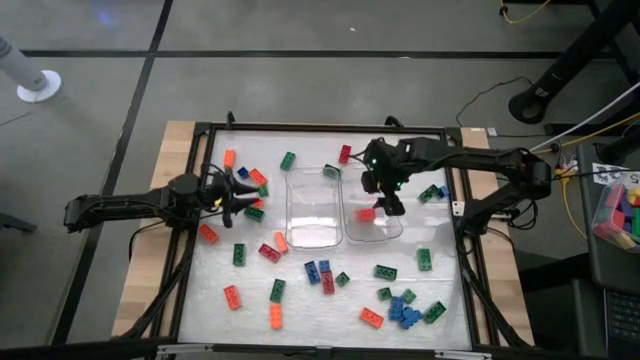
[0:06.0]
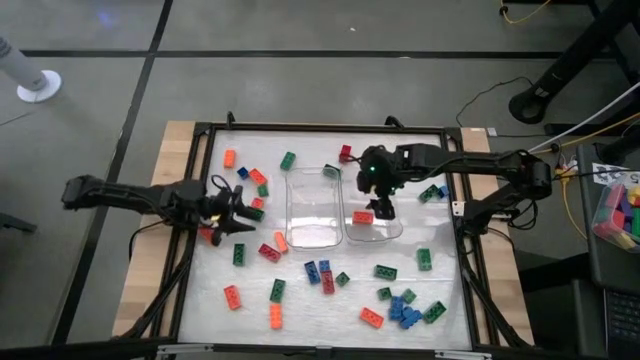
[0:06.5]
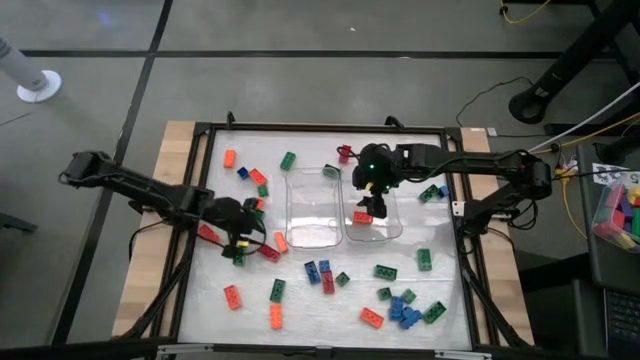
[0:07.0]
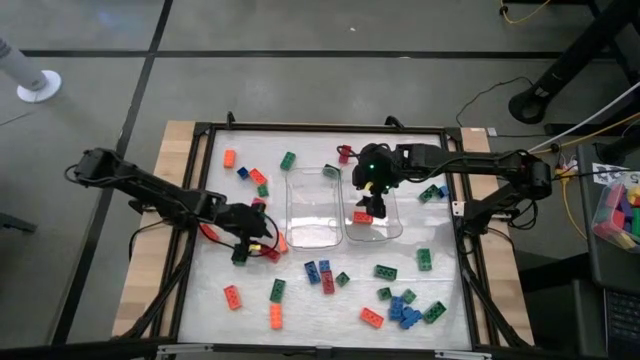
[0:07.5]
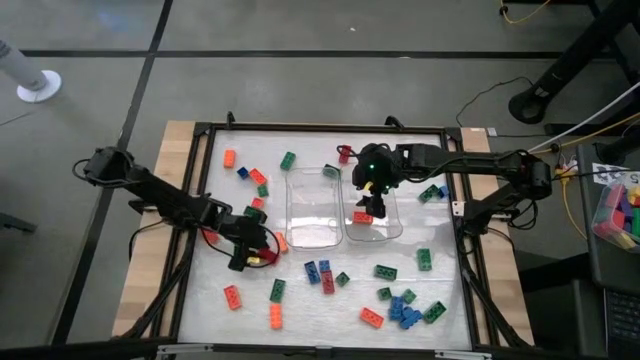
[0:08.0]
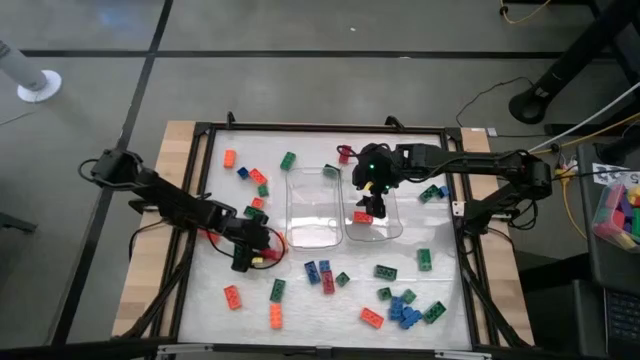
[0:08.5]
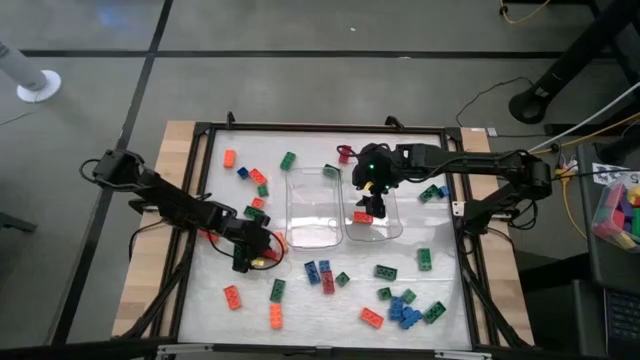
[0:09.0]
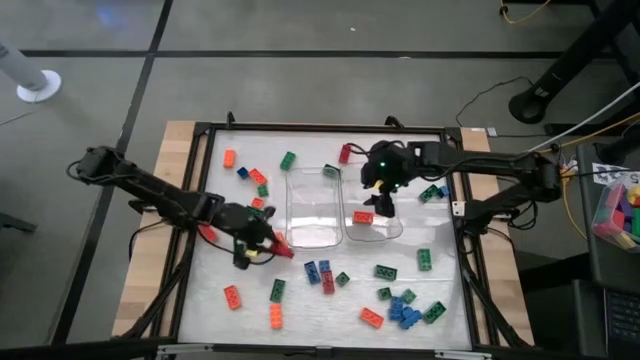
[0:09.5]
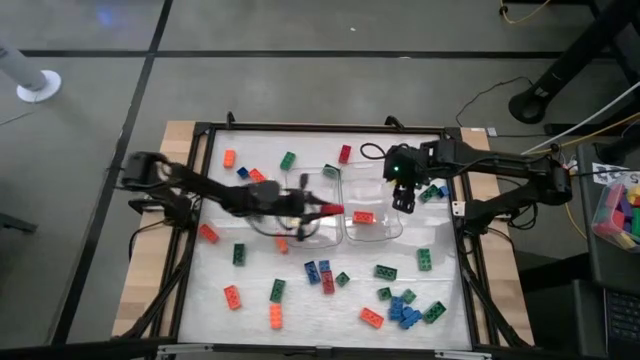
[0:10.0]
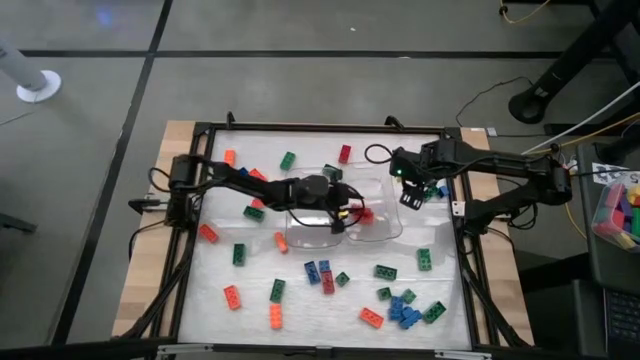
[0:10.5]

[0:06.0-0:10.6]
Task: Sort blocks by size
Put the red rectangular game piece into the right transparent bin

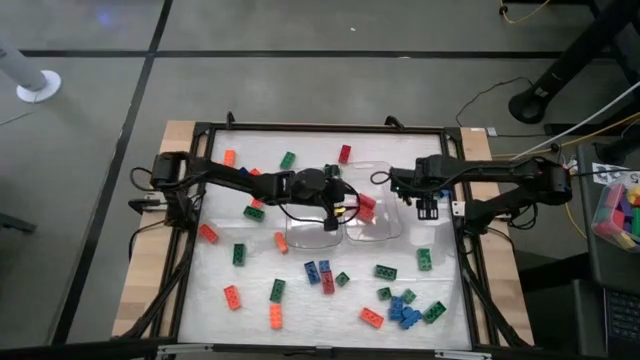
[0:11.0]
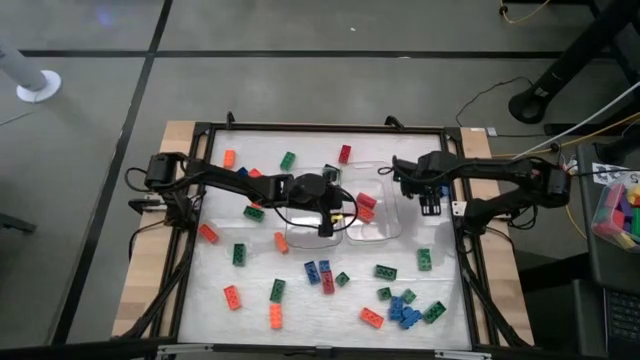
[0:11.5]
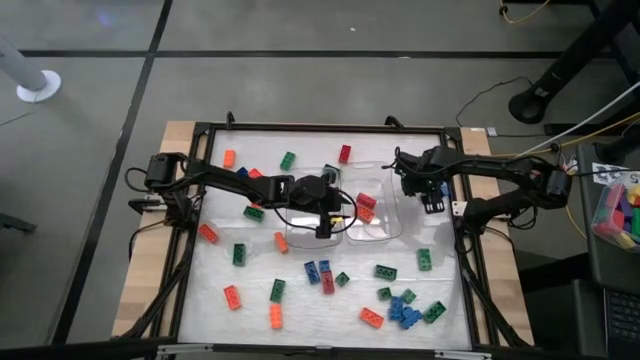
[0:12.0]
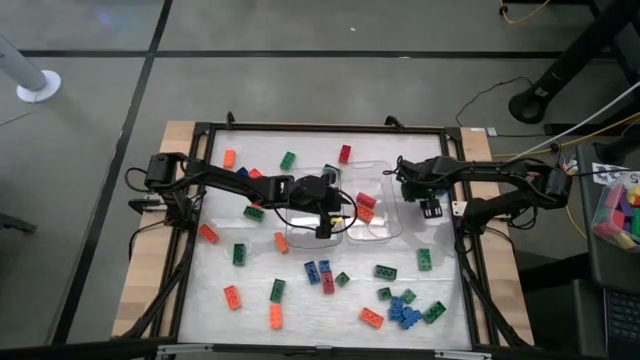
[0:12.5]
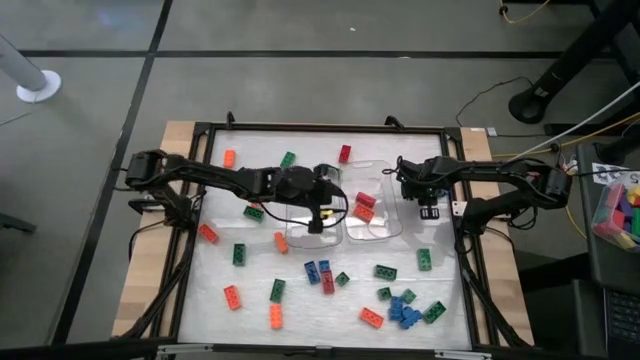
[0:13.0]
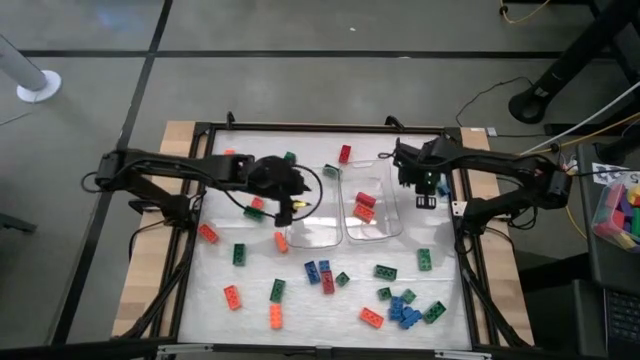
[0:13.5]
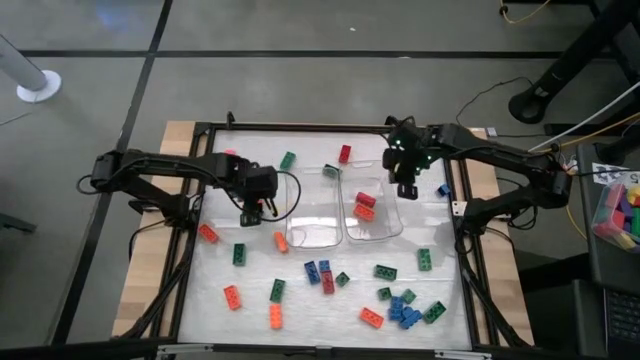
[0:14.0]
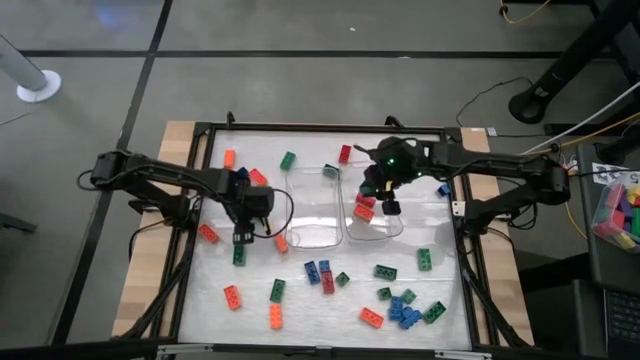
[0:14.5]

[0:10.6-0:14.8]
Put the green rectangular game piece into the right transparent bin

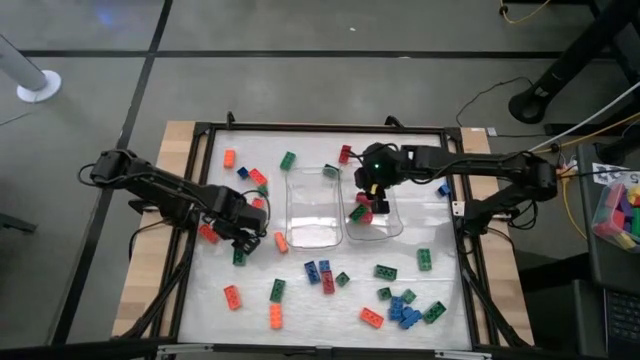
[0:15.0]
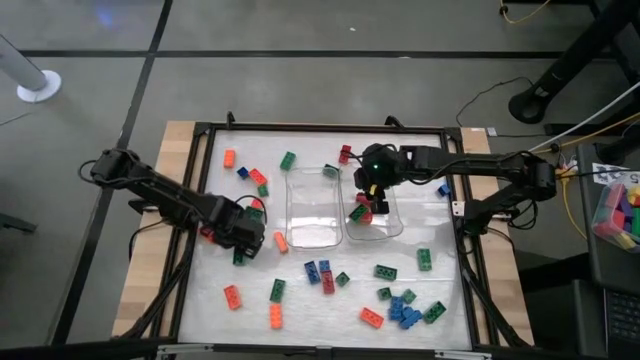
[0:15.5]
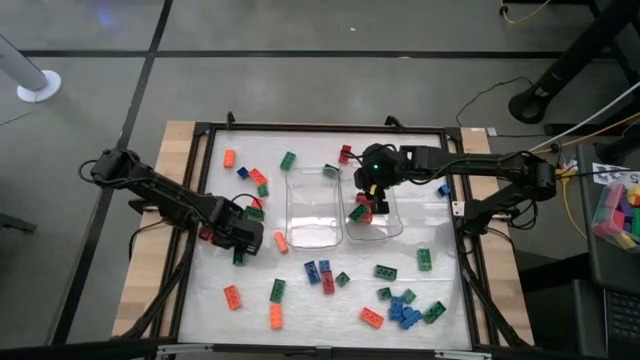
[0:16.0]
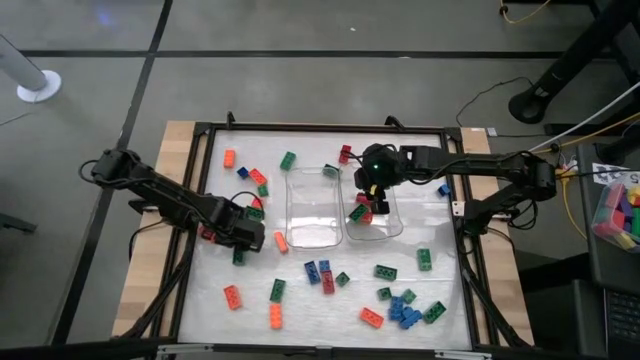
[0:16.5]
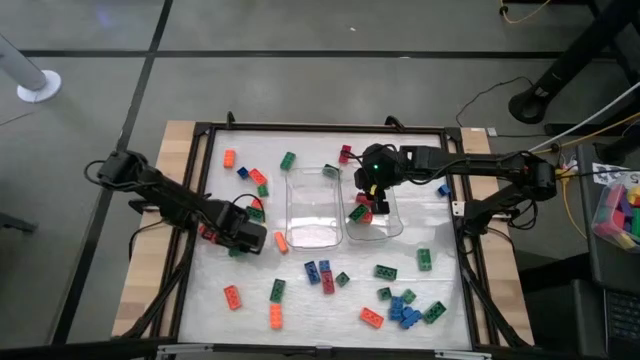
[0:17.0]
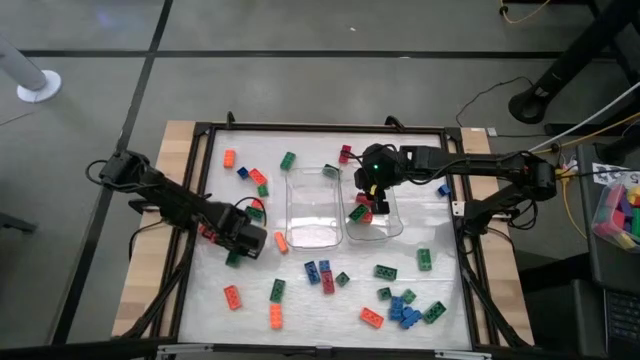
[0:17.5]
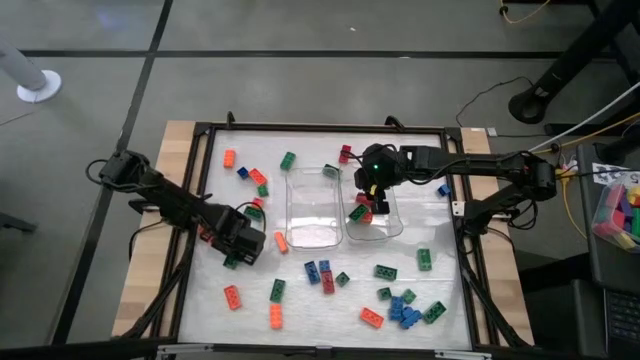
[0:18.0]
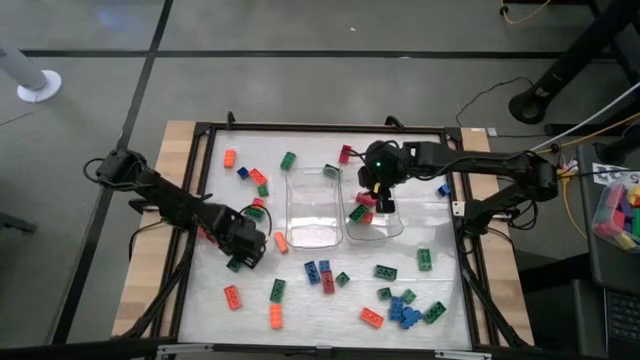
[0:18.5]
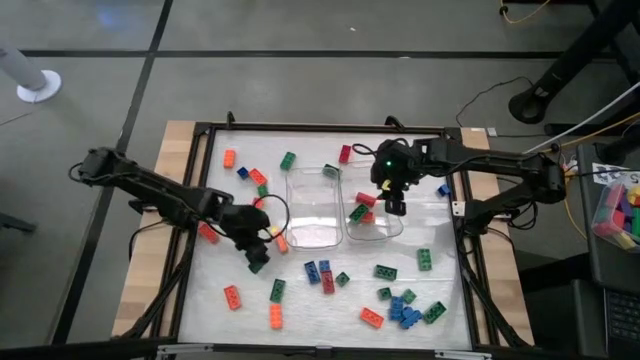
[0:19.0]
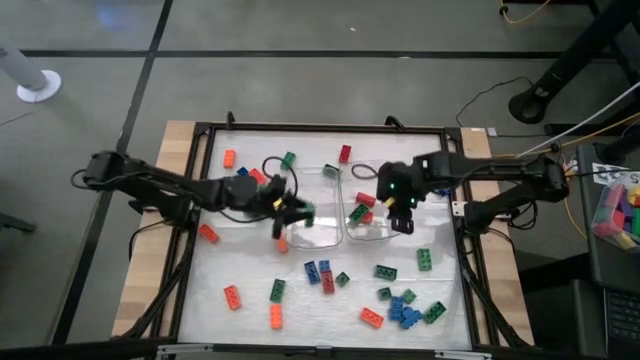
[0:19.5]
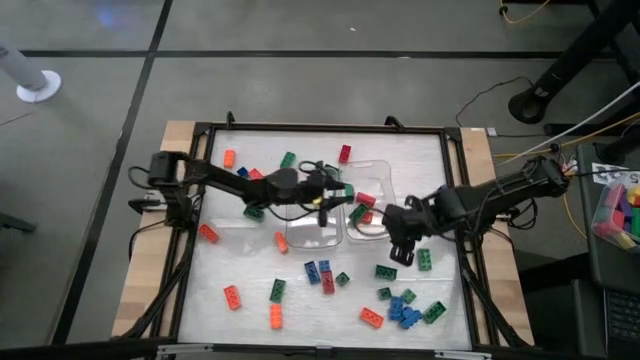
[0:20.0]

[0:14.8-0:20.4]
Put the green rectangular game piece into the right transparent bin

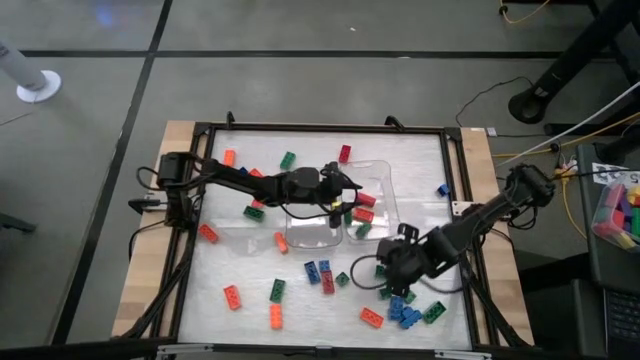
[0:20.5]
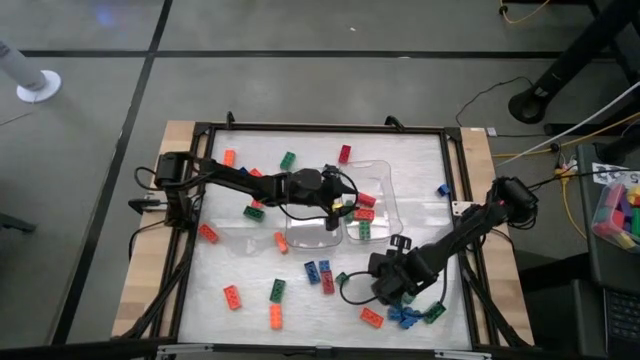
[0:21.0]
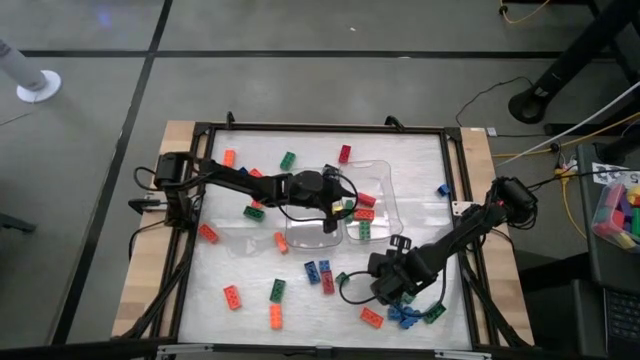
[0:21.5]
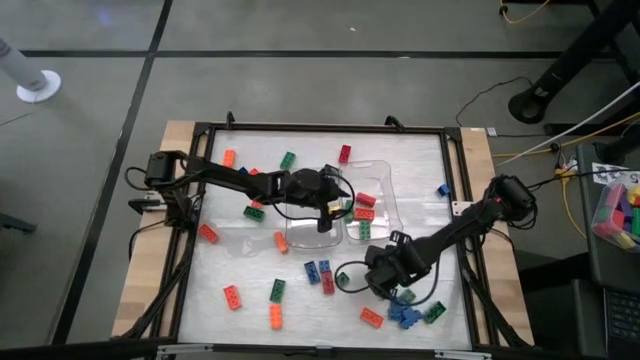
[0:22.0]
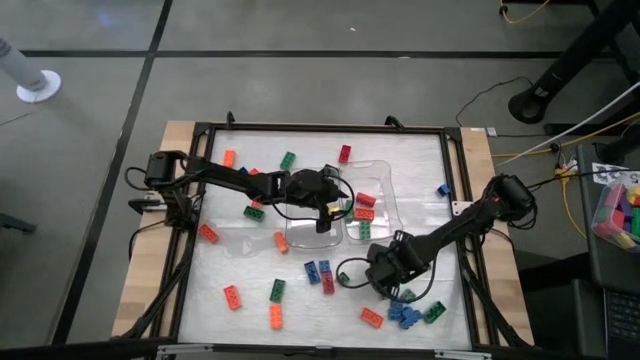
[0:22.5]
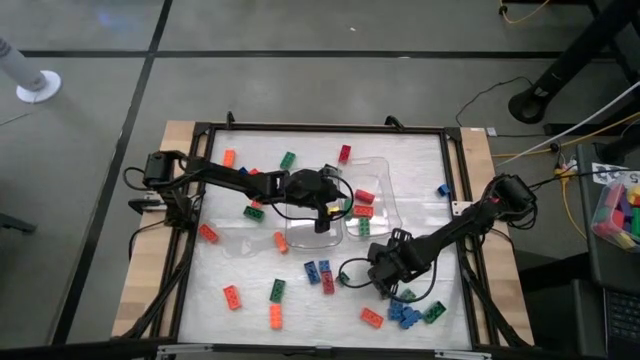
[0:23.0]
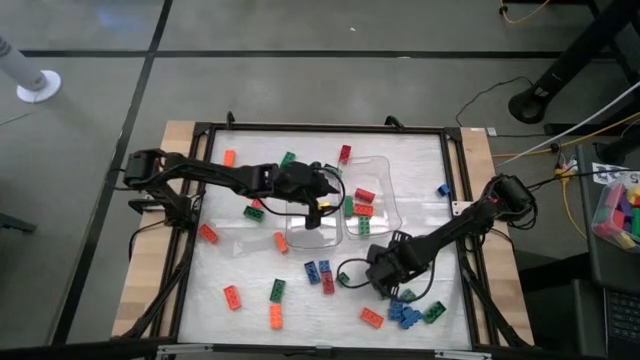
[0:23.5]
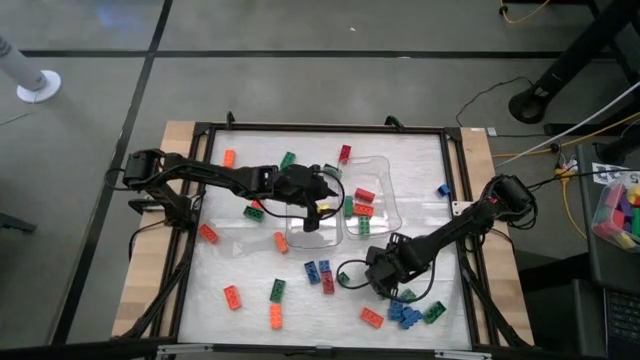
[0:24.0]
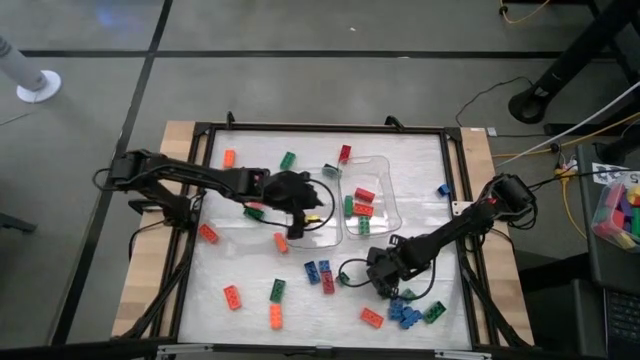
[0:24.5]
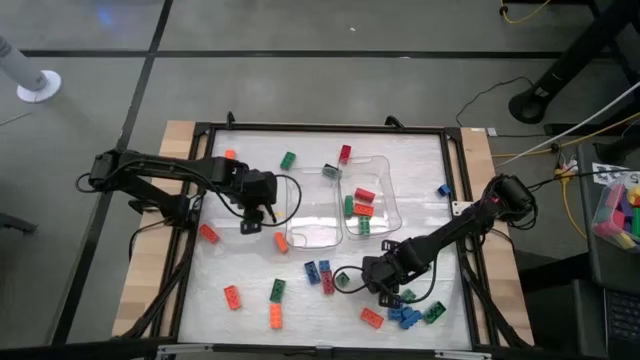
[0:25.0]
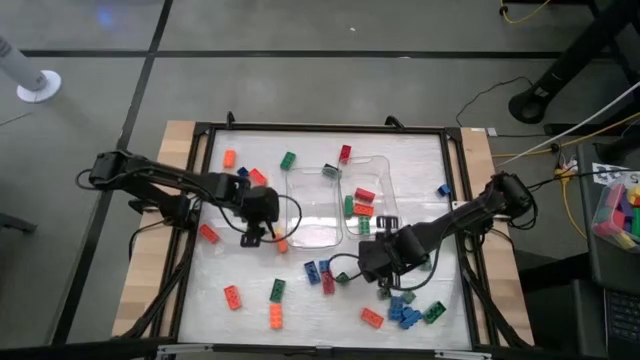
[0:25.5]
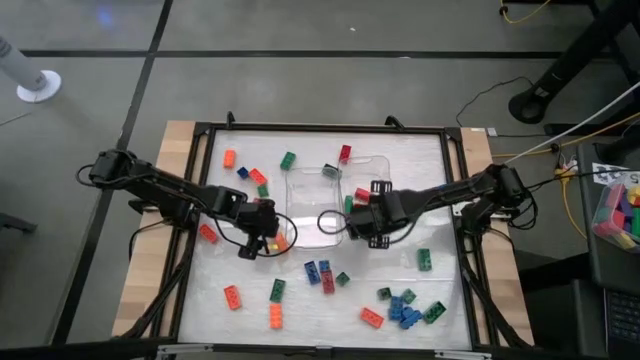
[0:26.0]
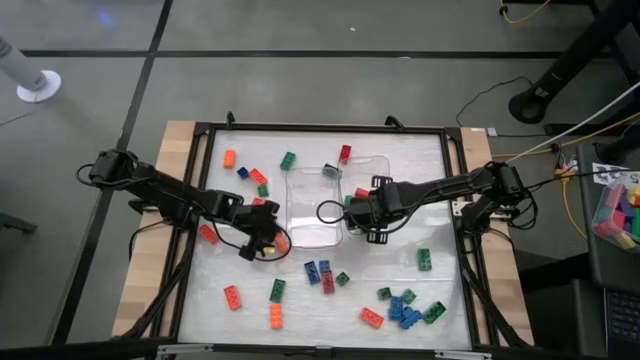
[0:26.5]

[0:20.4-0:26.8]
Put the green rectangular game piece into the right transparent bin

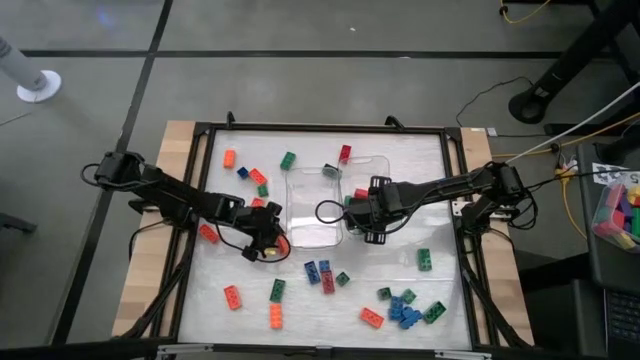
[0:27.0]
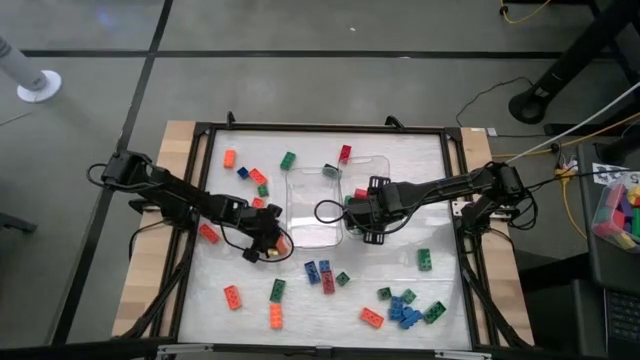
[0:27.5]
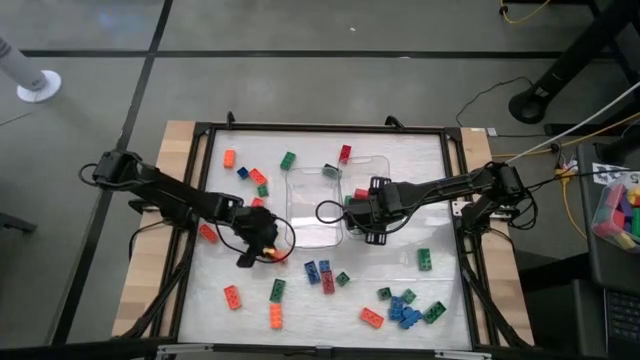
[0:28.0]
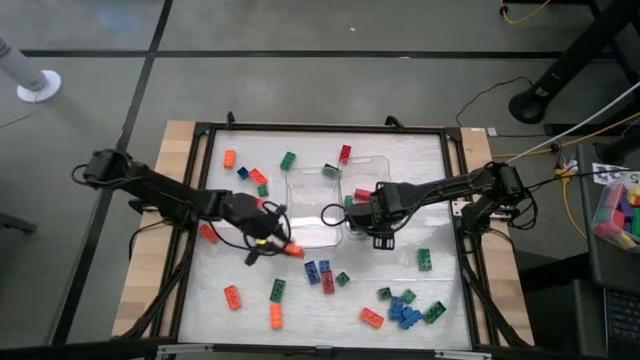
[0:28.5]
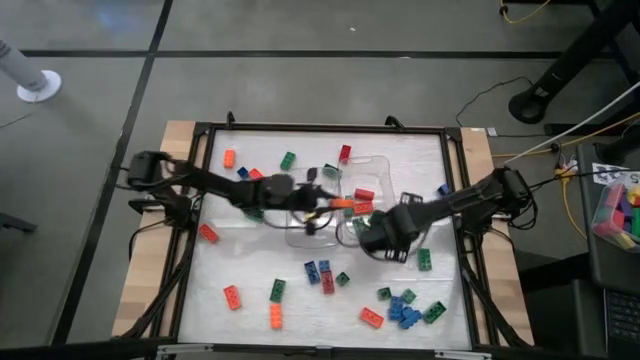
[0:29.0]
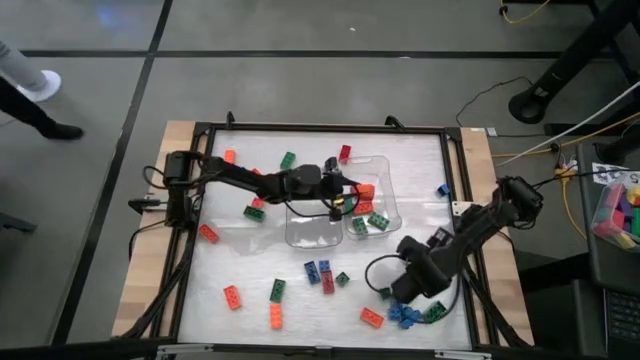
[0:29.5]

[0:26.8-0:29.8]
Put the orange rectangular game piece into the right transparent bin
